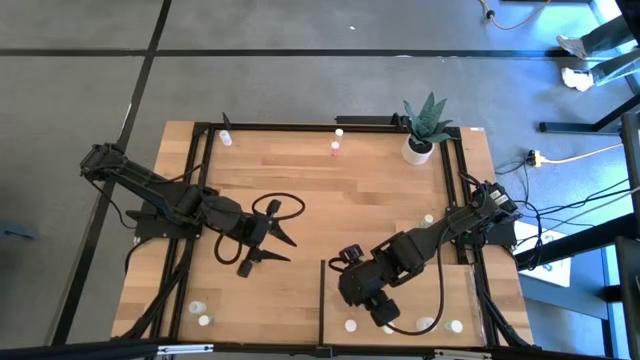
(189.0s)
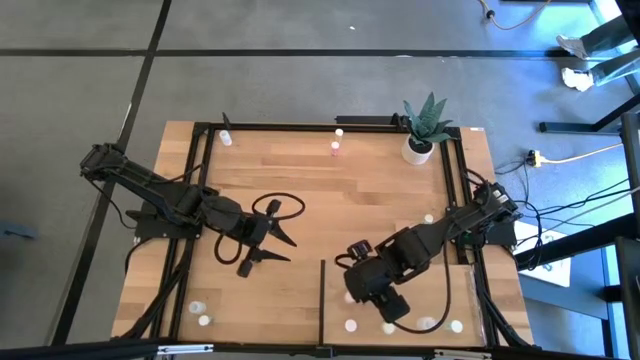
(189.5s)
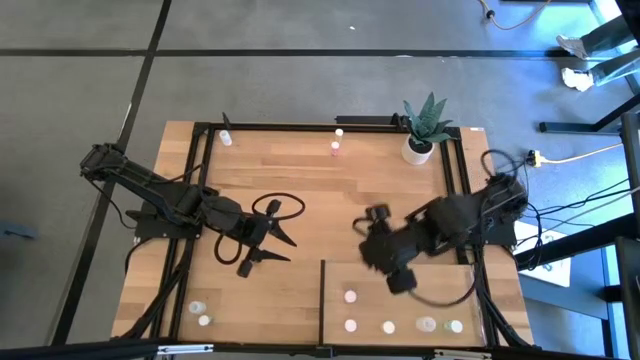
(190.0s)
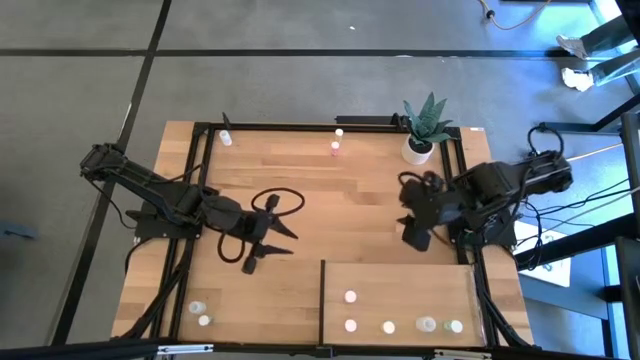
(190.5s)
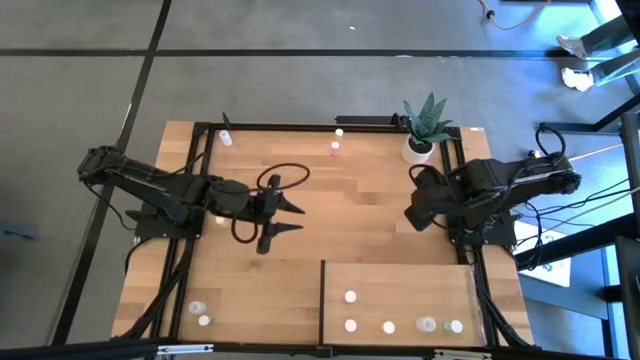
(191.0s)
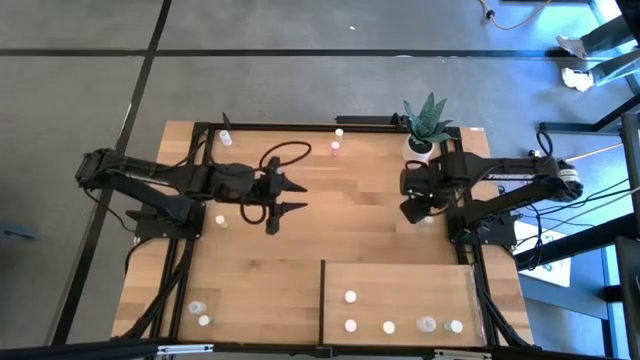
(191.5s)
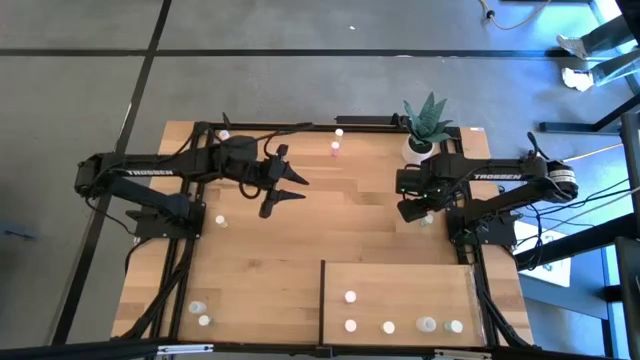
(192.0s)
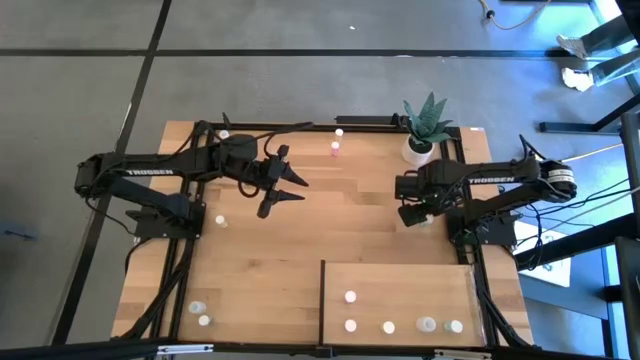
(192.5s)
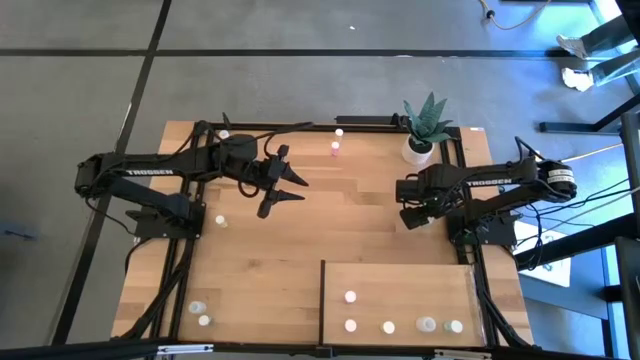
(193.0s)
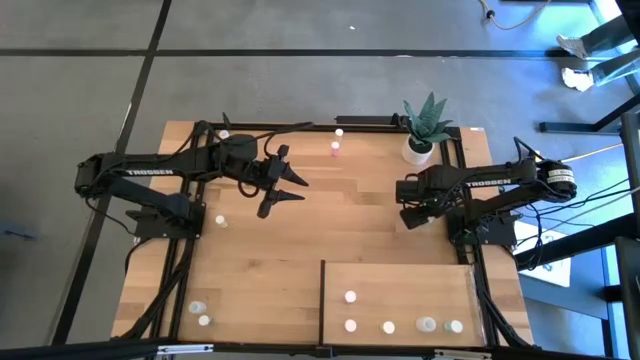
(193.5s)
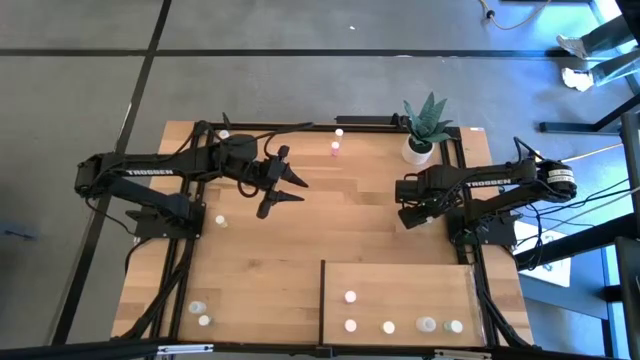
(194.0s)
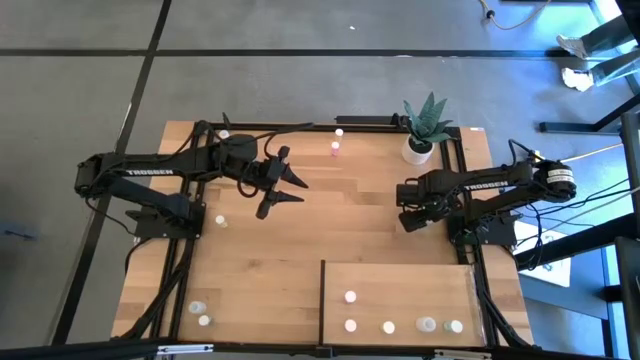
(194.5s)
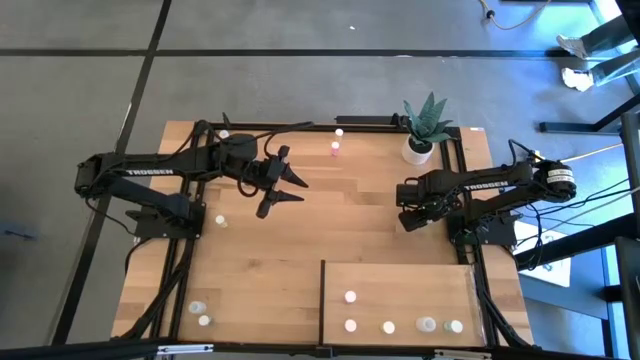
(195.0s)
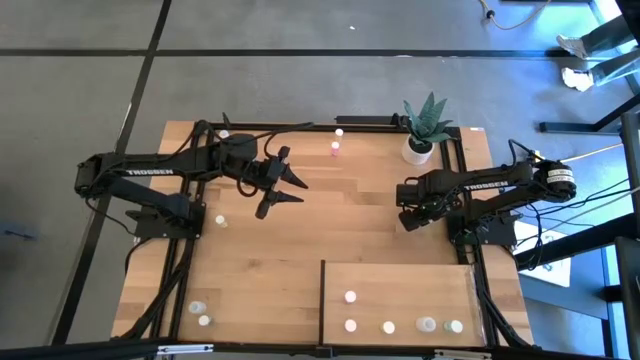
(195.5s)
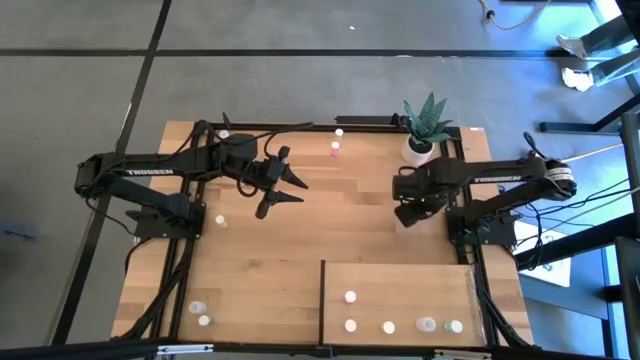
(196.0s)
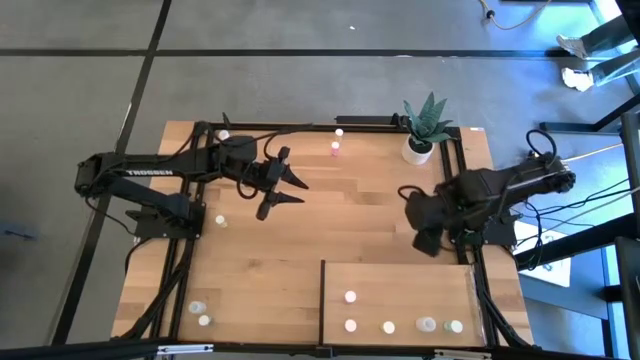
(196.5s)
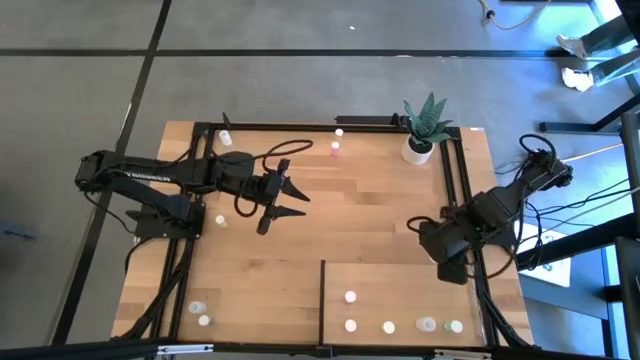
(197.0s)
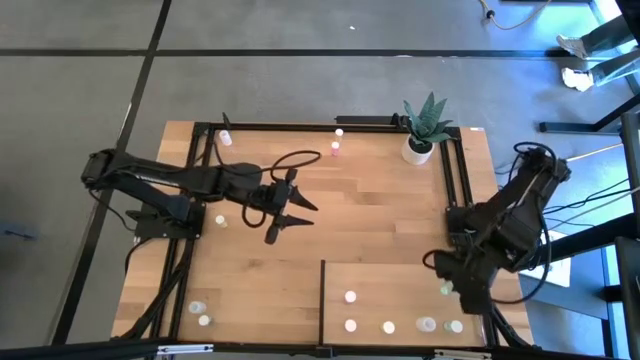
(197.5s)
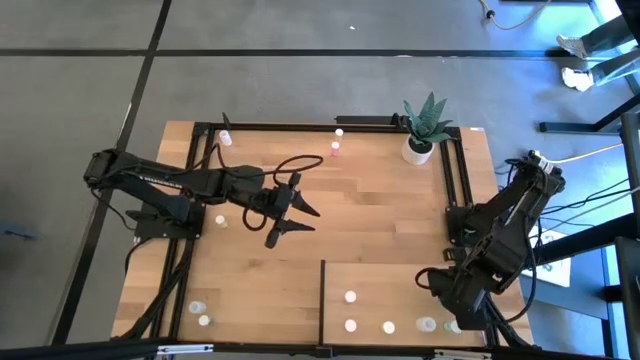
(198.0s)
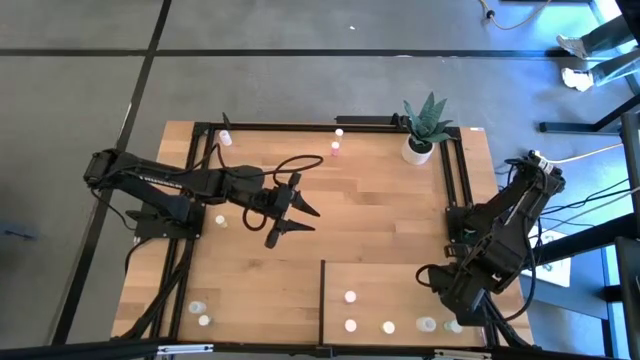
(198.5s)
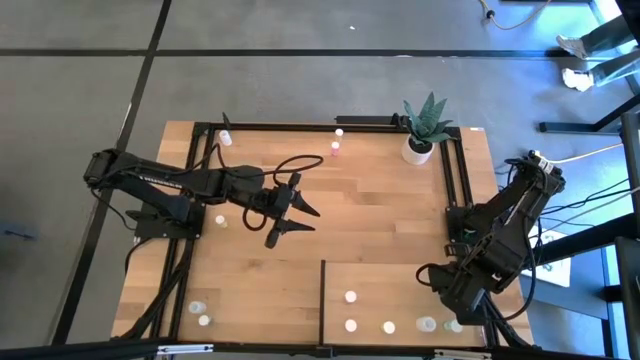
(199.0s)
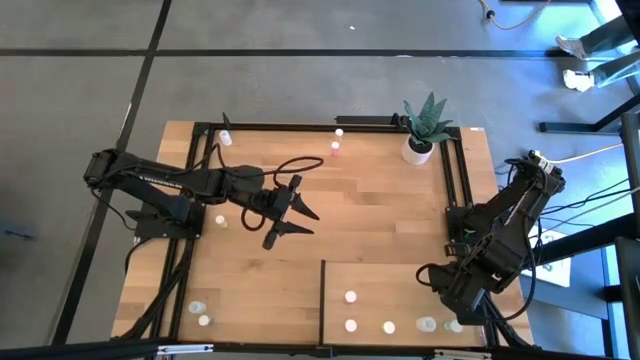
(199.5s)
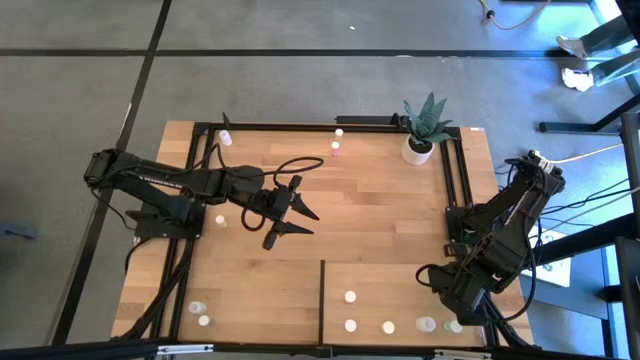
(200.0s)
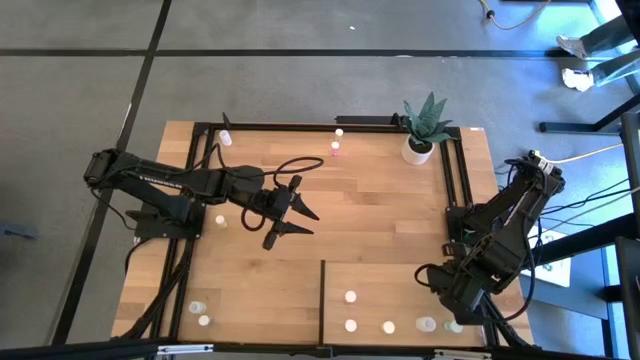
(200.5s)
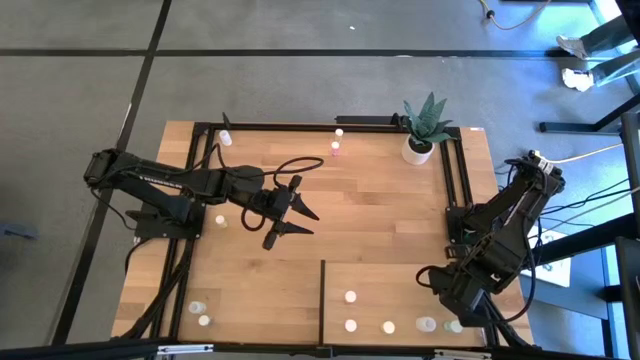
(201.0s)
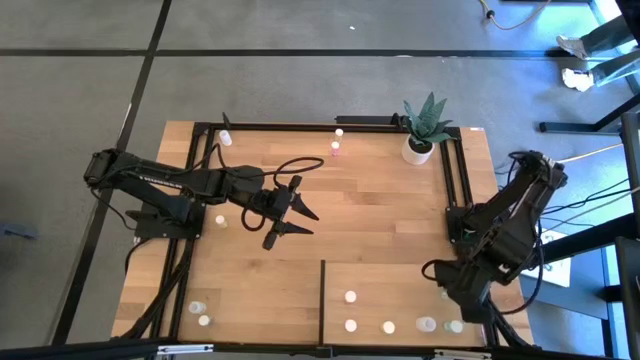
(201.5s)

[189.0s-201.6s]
Task: Pick and place medicine bottles onto shelf by color
Put the top blue pill bottle on the shelf aligned with the other blue pill bottle

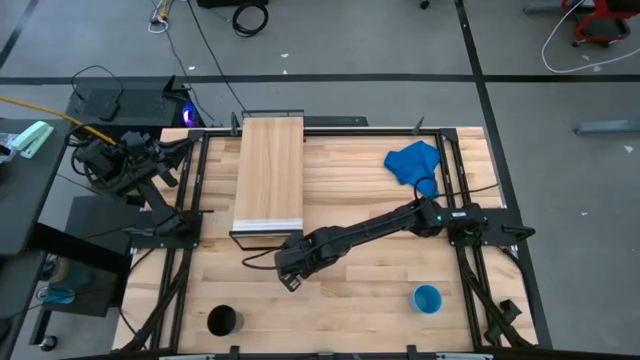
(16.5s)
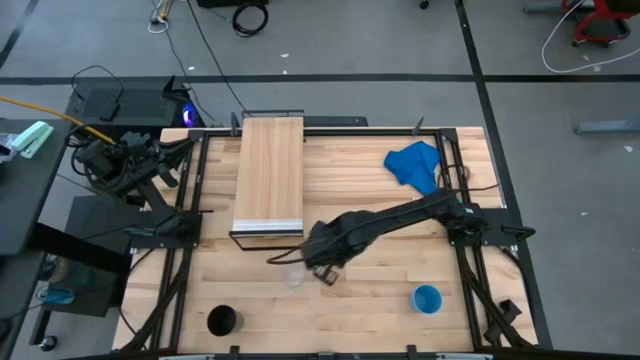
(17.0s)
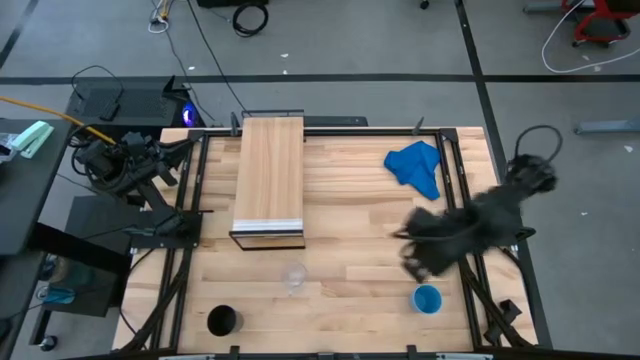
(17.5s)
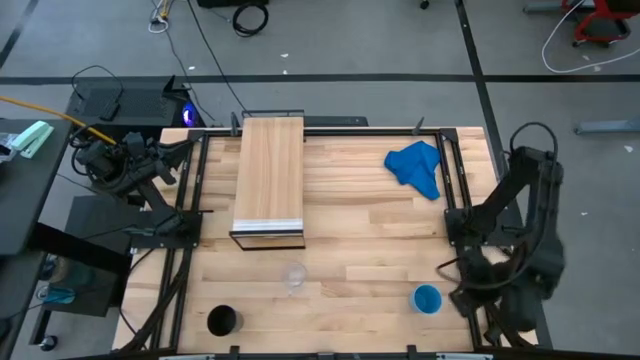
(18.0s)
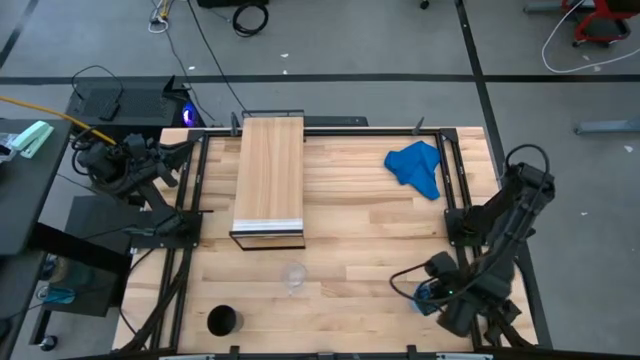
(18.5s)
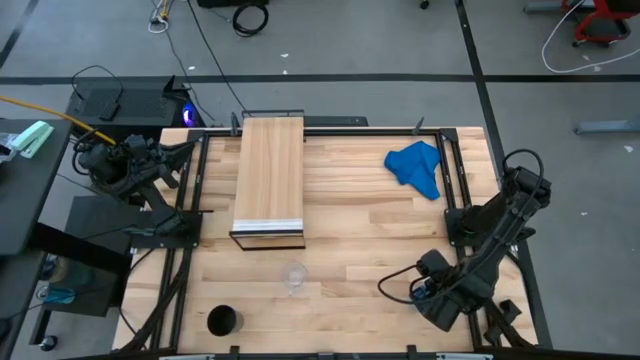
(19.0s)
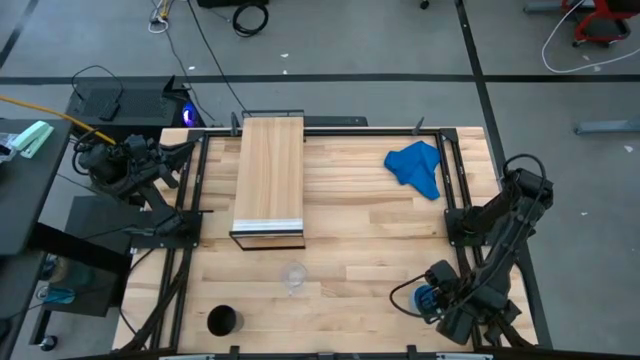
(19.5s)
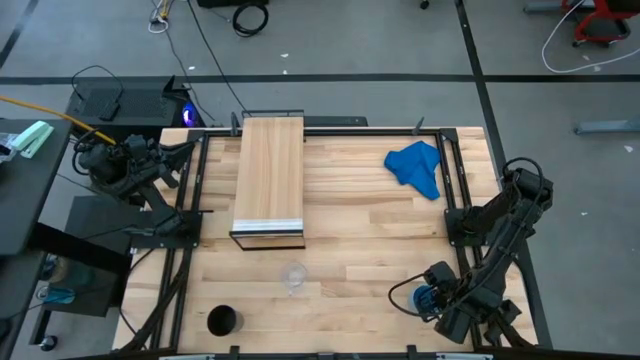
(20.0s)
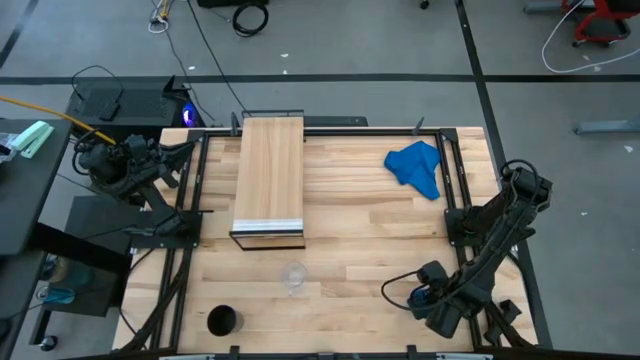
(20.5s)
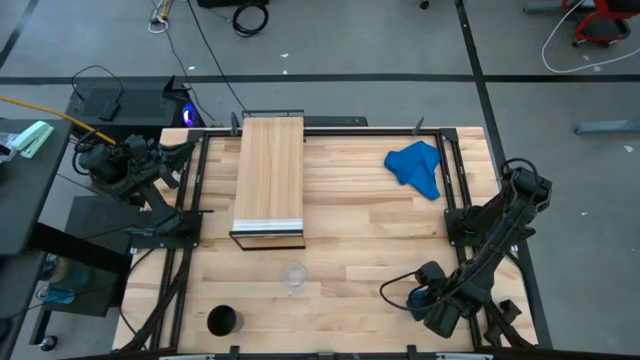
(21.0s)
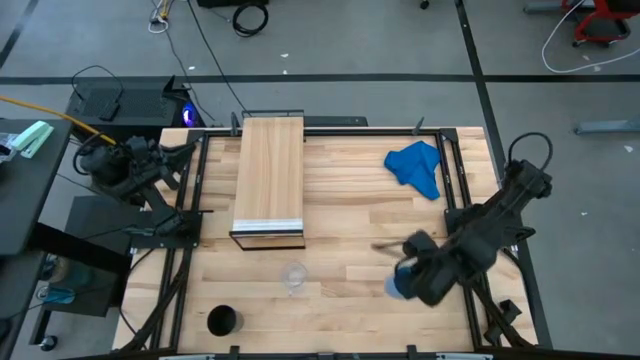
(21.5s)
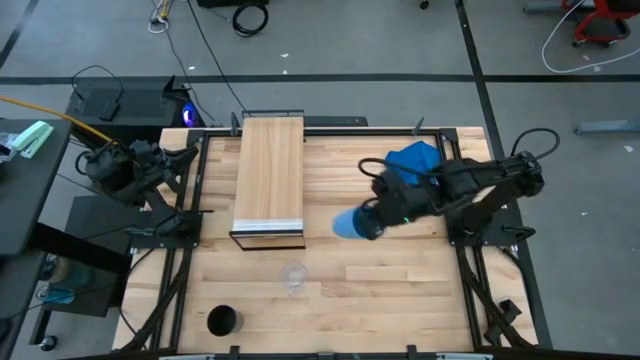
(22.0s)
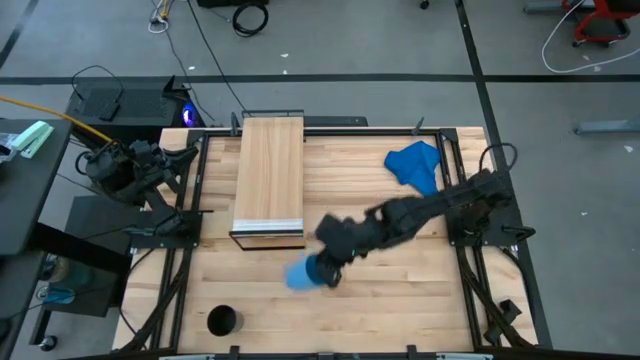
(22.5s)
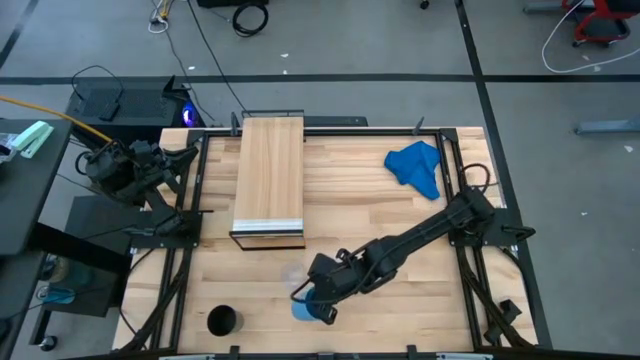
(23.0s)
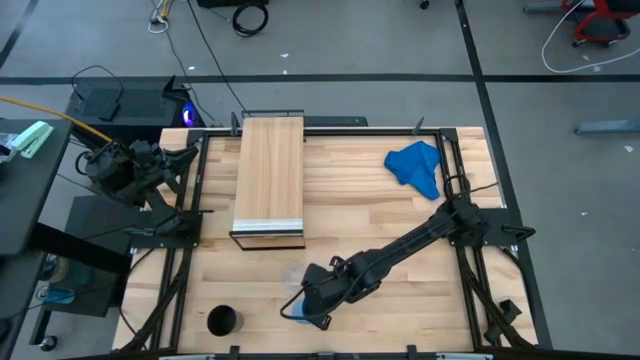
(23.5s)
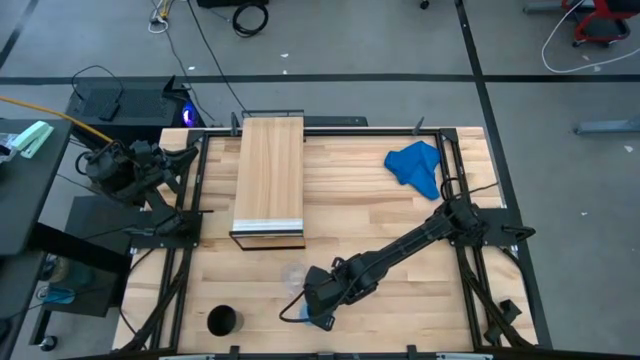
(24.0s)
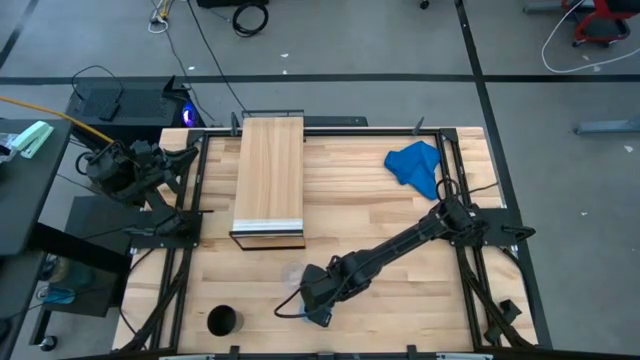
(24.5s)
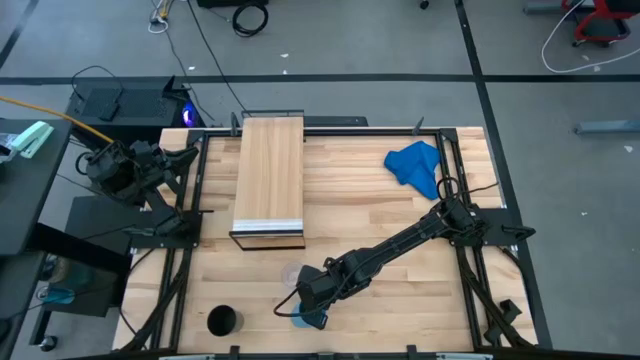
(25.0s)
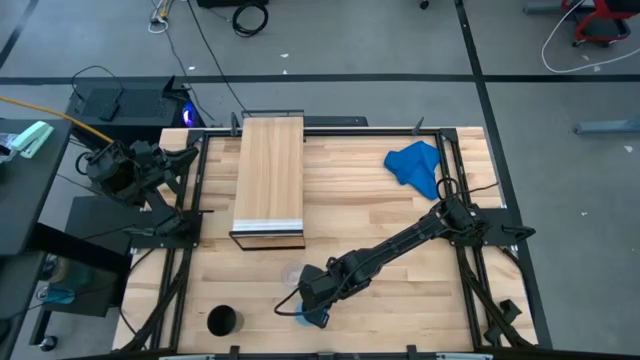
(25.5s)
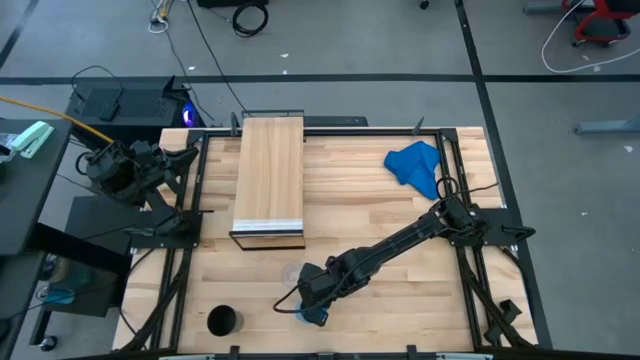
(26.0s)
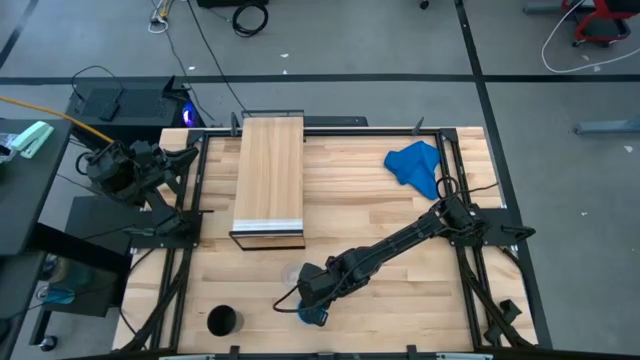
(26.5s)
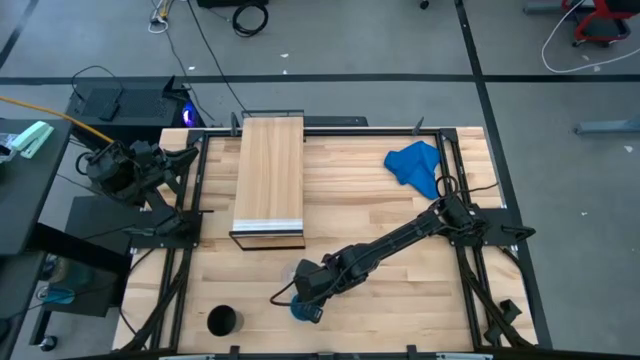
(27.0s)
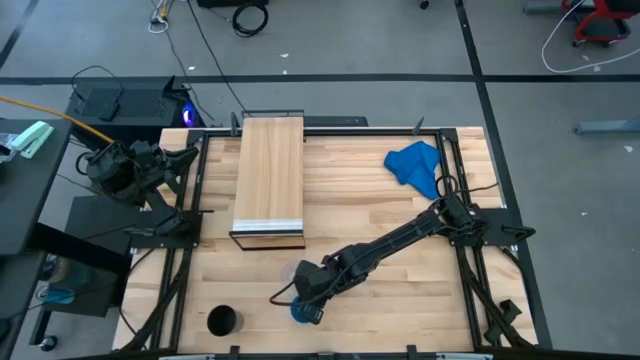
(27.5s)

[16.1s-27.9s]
Task: Stack small to large cups/mugs on shelf
Move the blue cup to the bottom of the transparent mug
